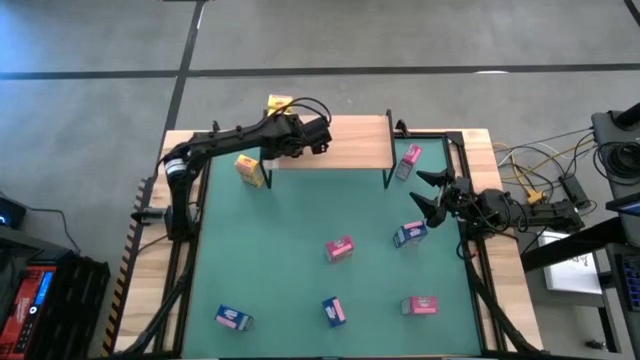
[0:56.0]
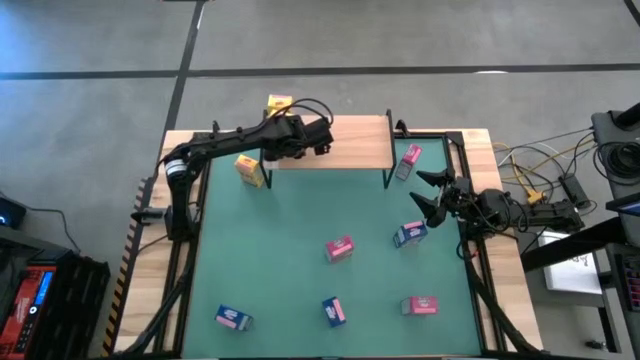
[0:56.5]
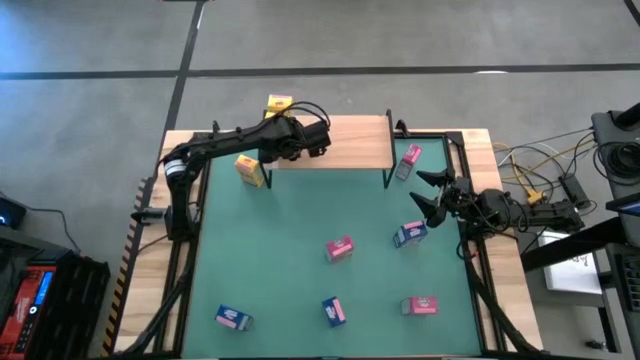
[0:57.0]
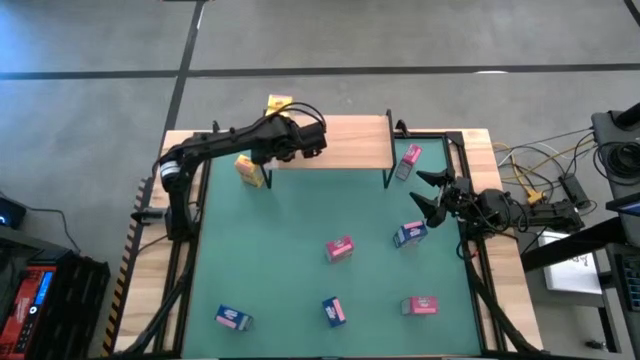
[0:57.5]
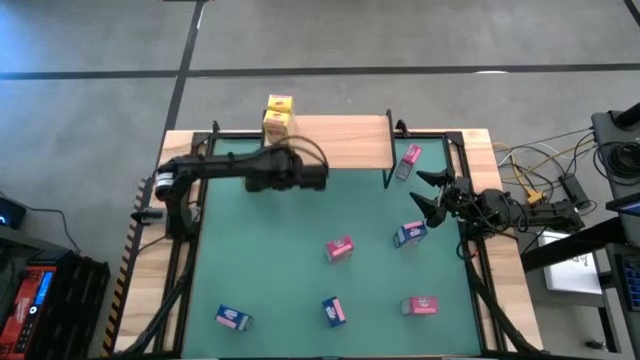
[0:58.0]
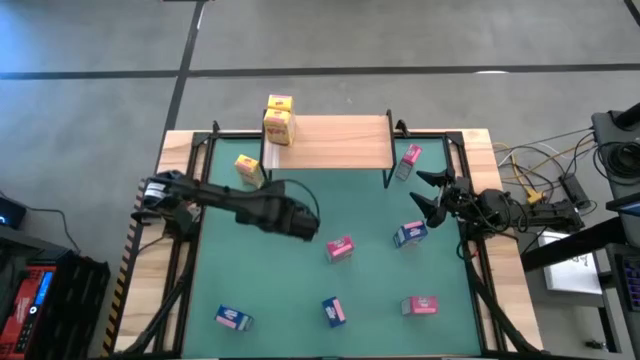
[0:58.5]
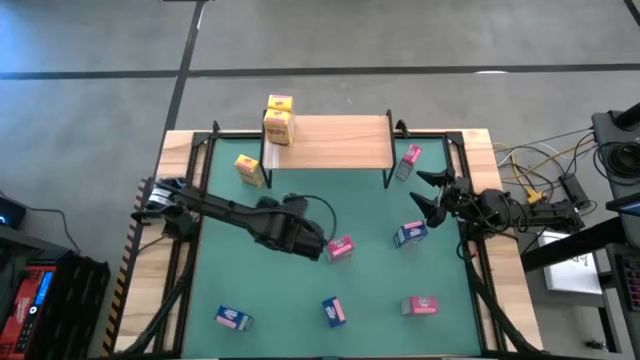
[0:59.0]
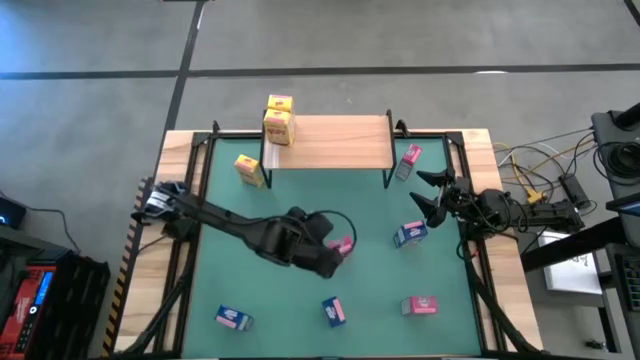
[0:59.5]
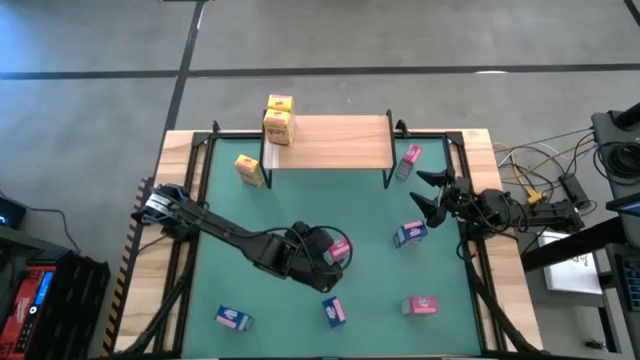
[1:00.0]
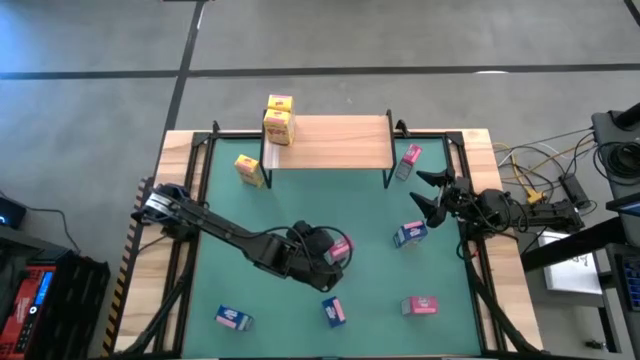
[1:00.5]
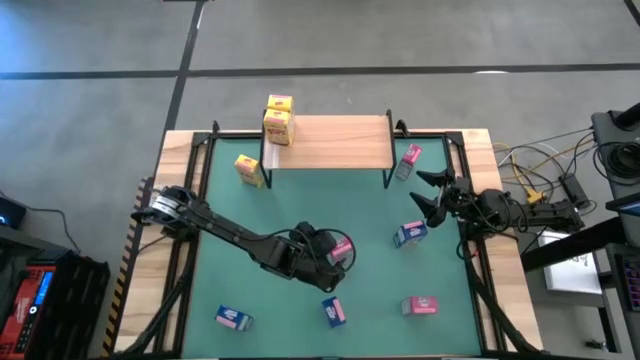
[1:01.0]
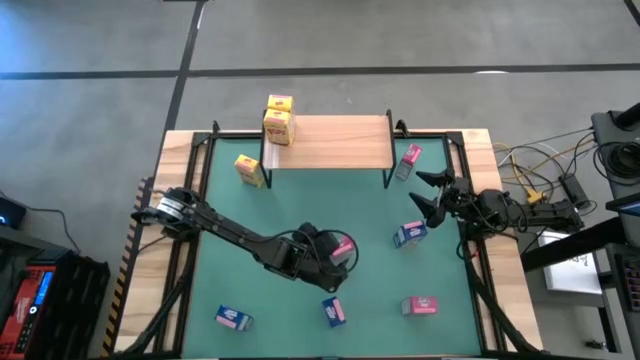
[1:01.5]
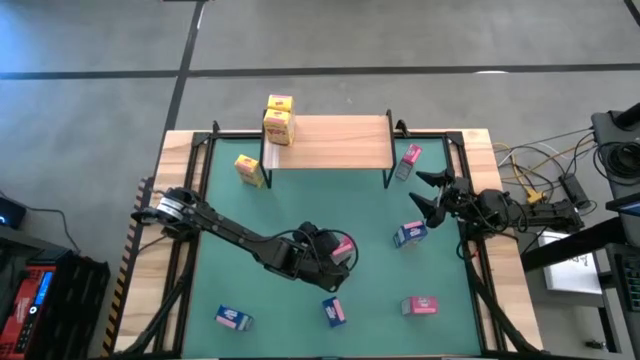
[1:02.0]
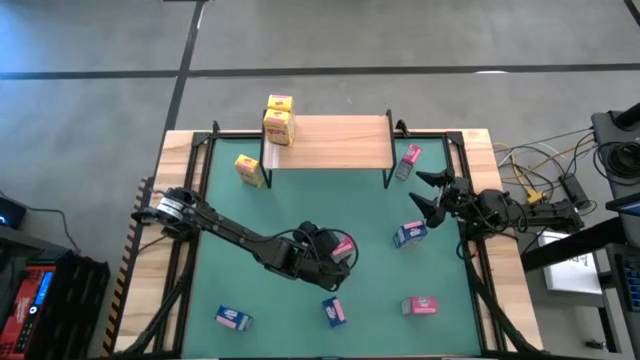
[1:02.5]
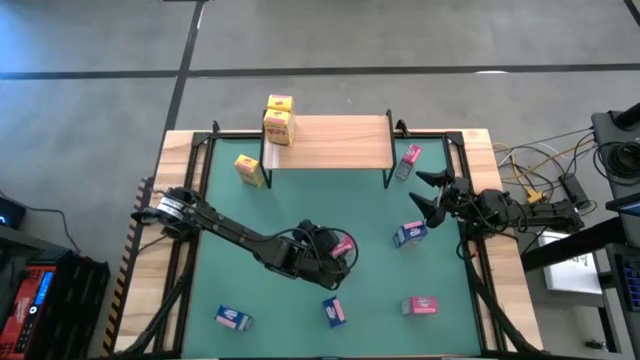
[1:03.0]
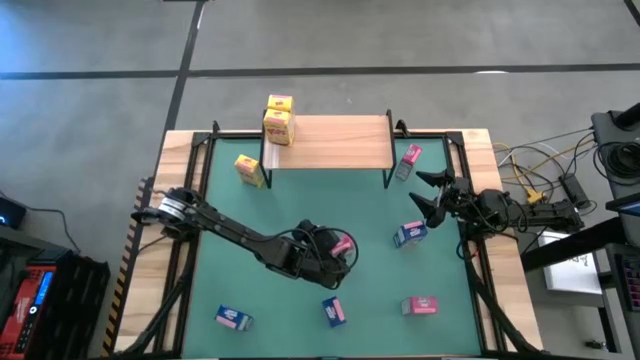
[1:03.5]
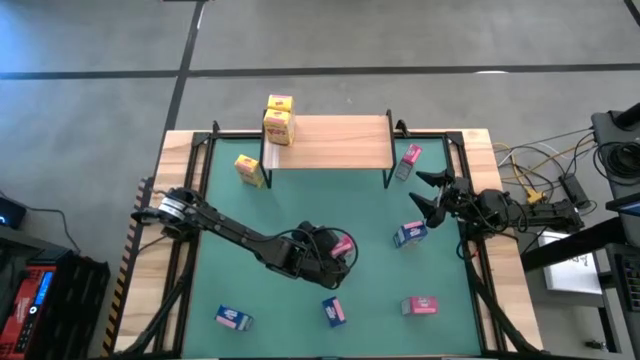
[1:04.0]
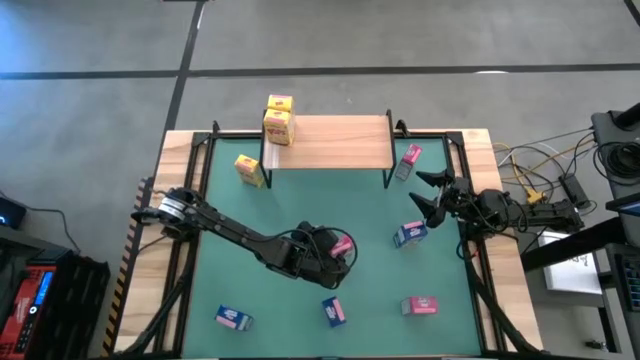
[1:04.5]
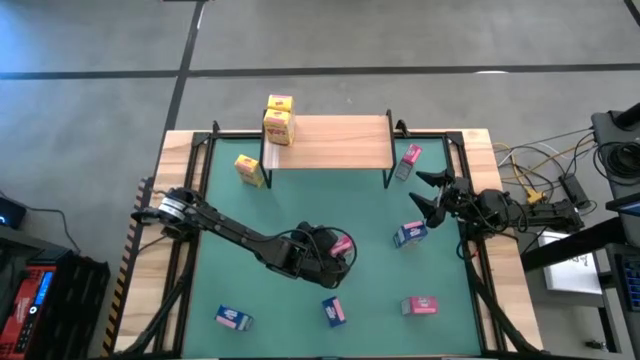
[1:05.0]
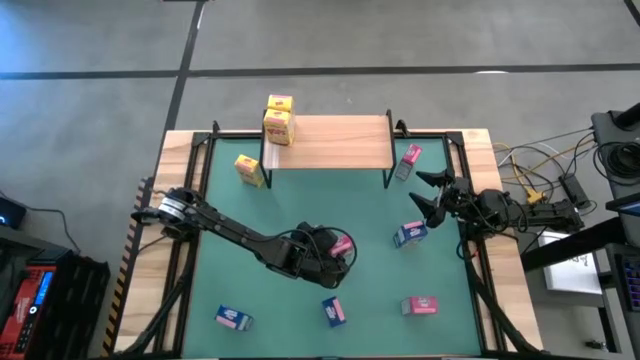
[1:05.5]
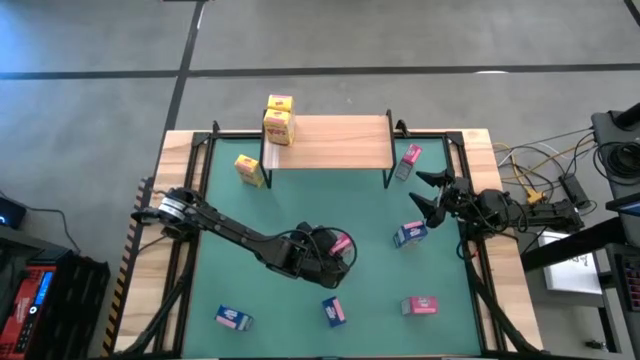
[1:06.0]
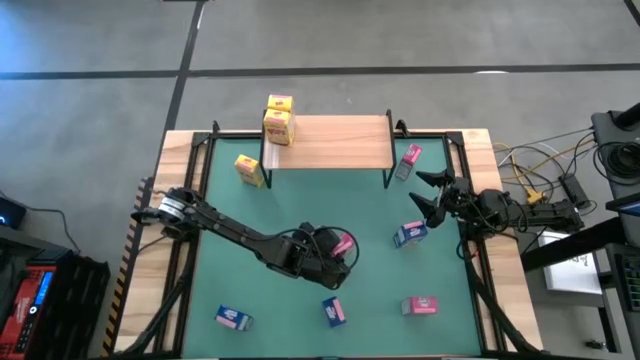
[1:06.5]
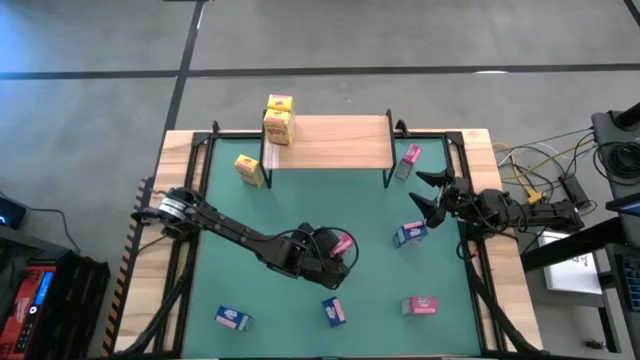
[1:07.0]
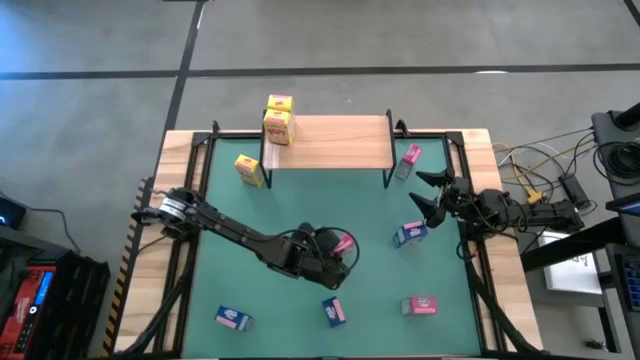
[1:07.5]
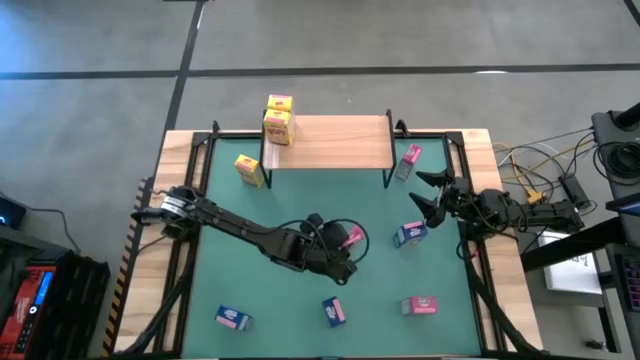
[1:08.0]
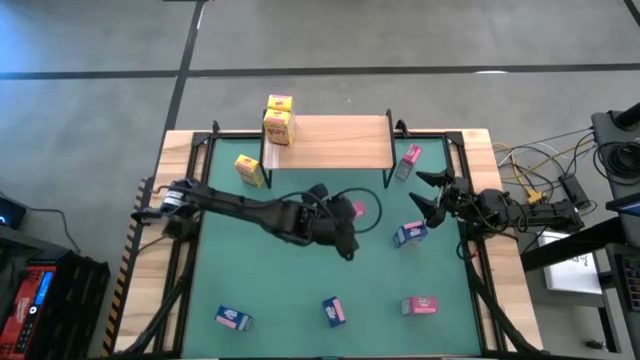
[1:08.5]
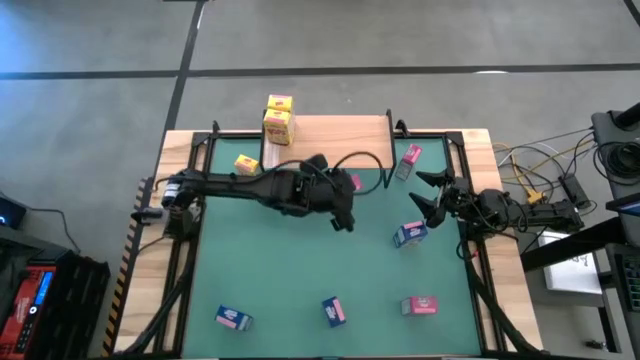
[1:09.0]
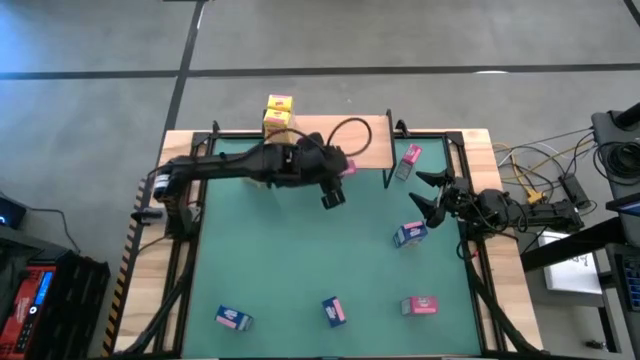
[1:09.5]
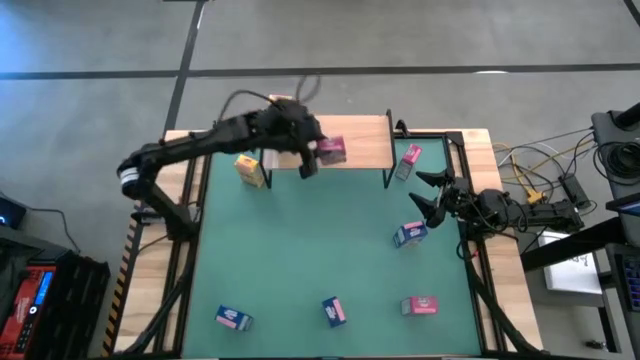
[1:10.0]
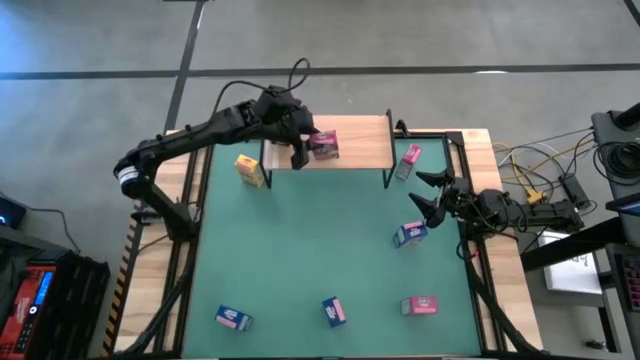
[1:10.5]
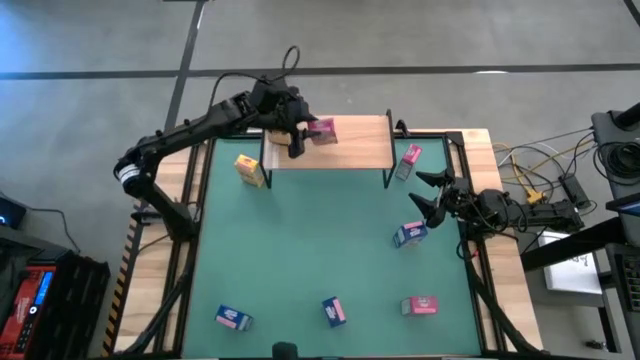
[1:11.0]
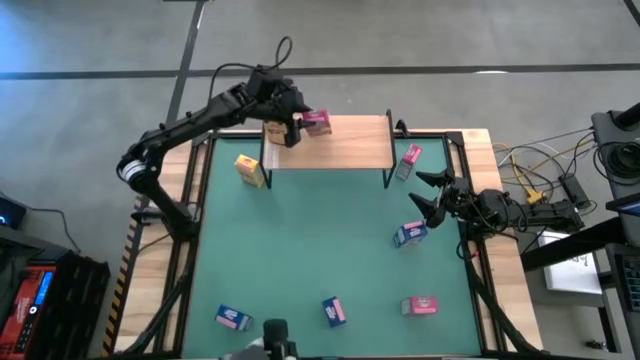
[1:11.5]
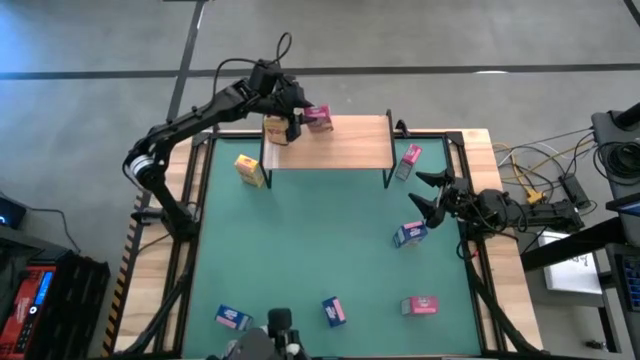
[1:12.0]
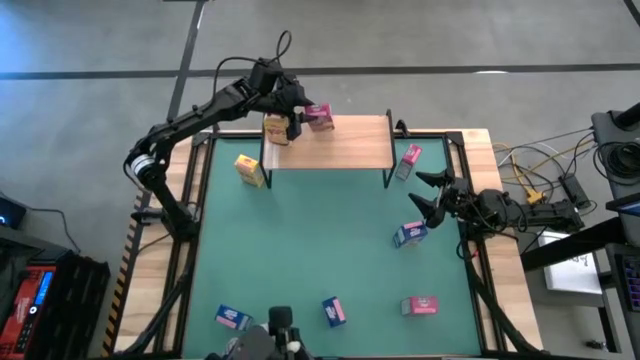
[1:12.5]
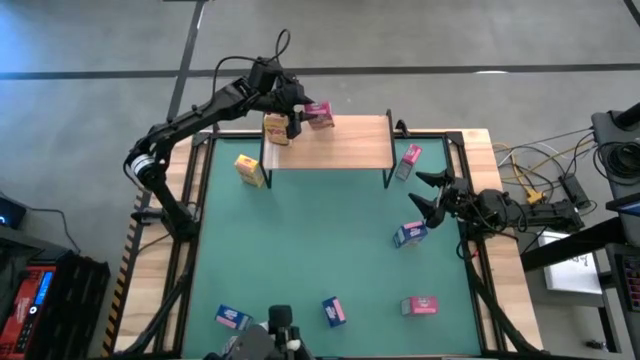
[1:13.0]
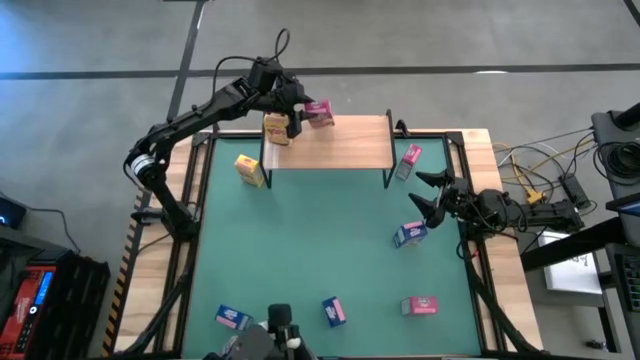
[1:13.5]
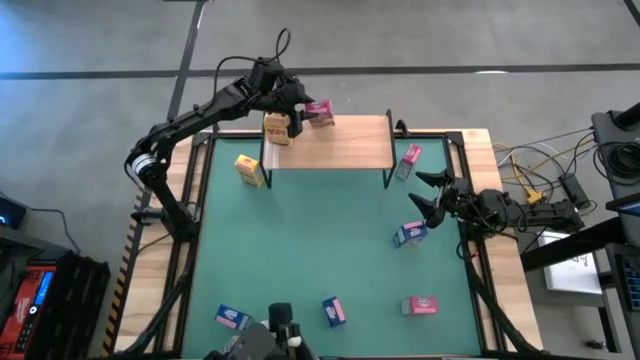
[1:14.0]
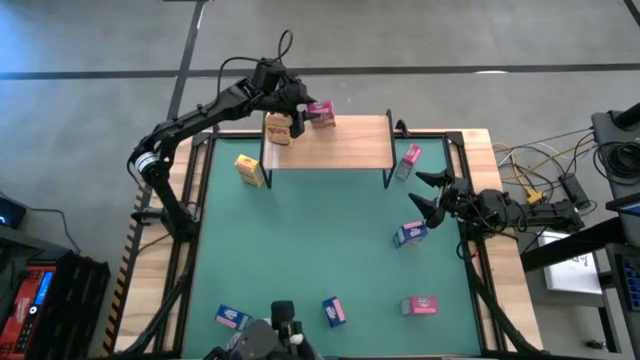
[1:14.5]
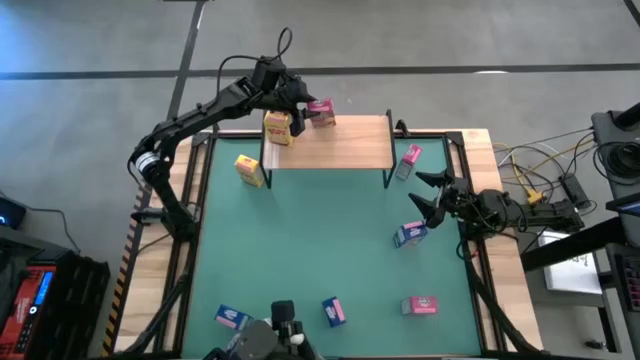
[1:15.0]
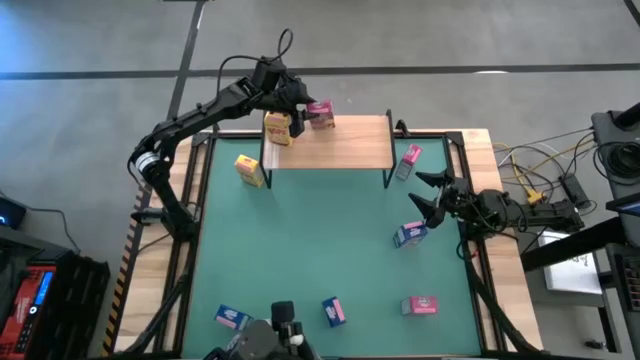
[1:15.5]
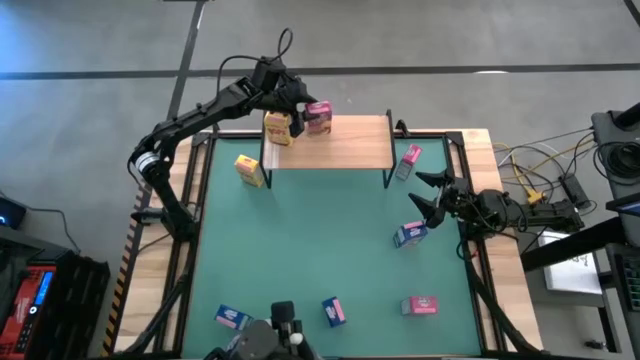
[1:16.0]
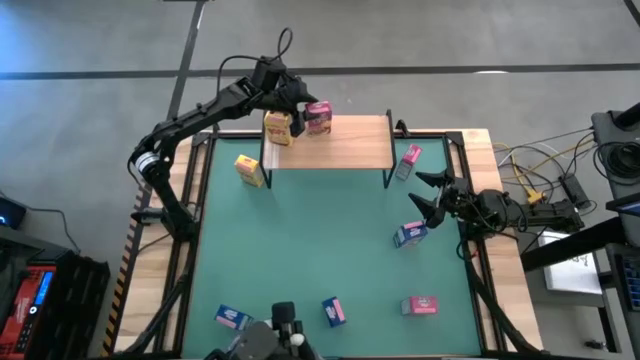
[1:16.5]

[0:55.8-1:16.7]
Task: Stack cereal on shelf
Put the middle left purple cereal box on the shelf

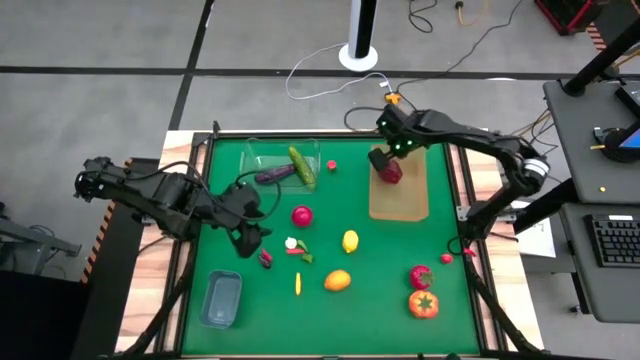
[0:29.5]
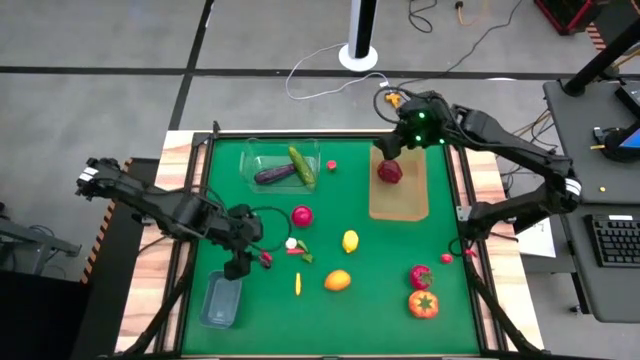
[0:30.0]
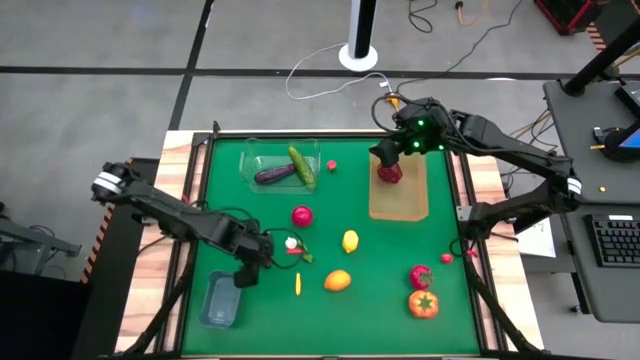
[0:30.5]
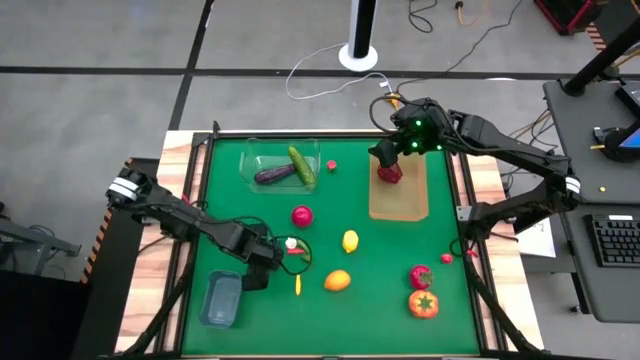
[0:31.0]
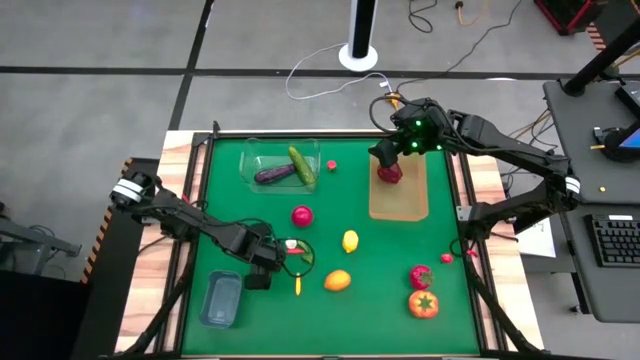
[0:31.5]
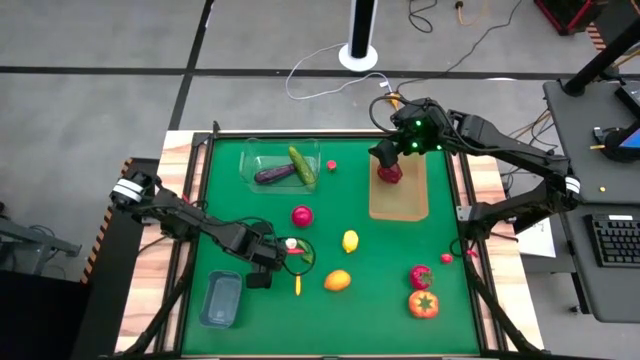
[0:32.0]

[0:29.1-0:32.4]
Task: Sort produce into baskets
Put the purple eggplant into the blue bin
